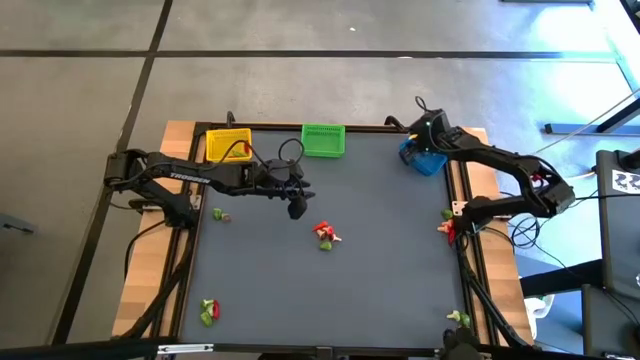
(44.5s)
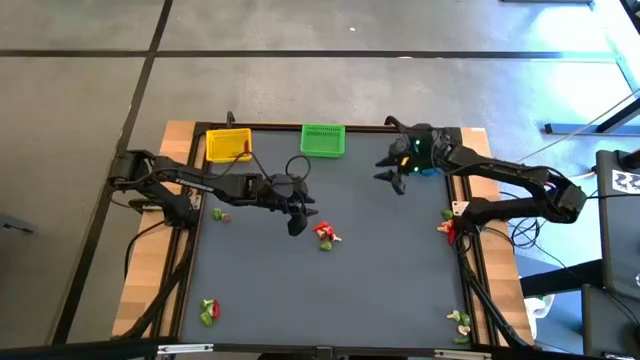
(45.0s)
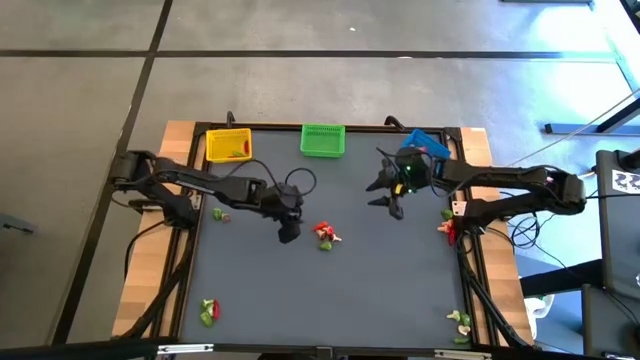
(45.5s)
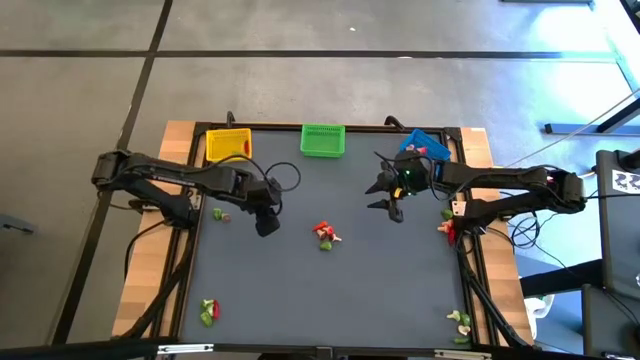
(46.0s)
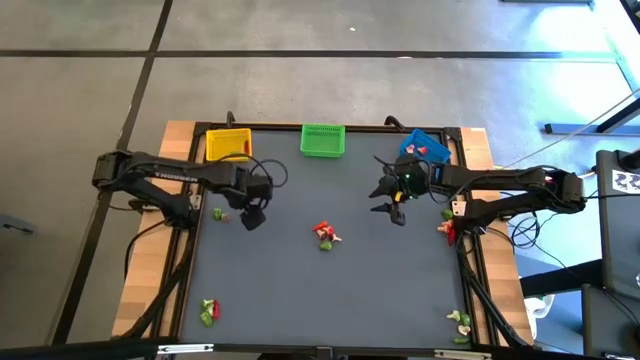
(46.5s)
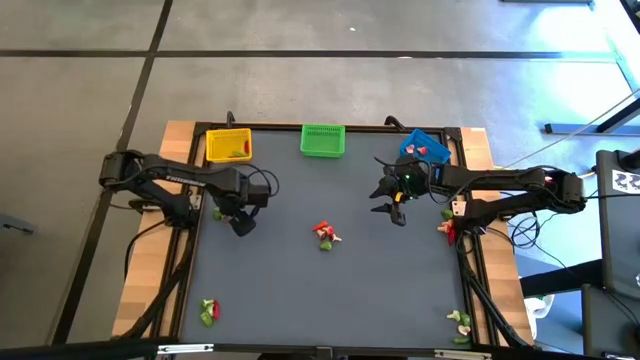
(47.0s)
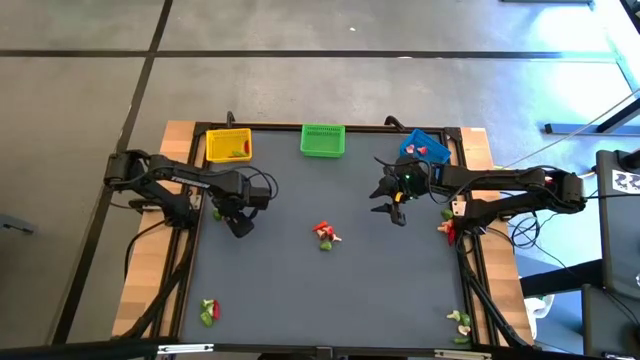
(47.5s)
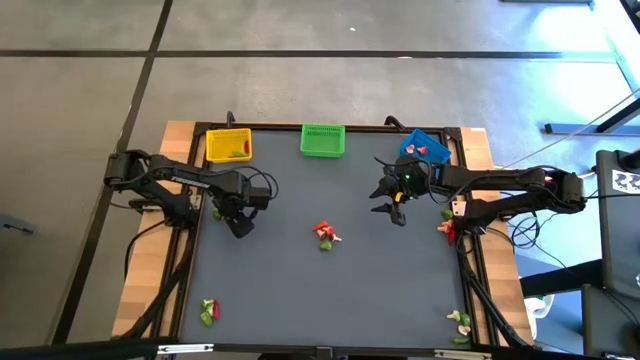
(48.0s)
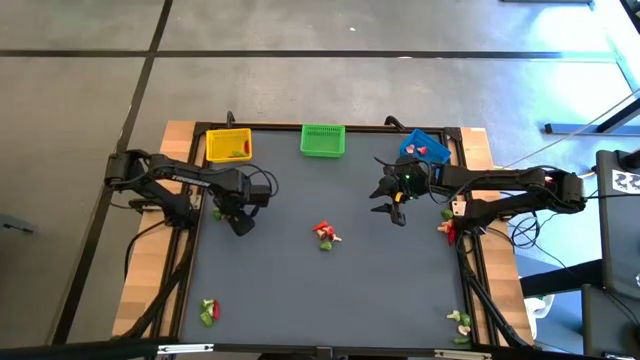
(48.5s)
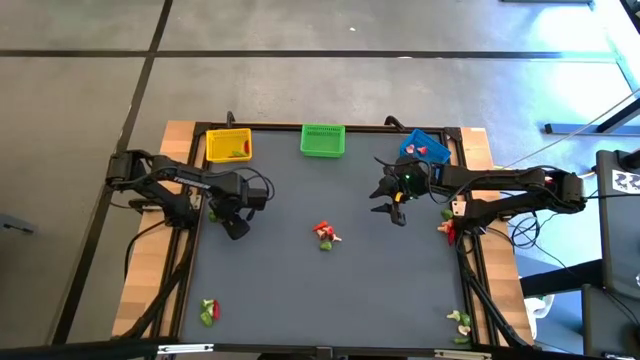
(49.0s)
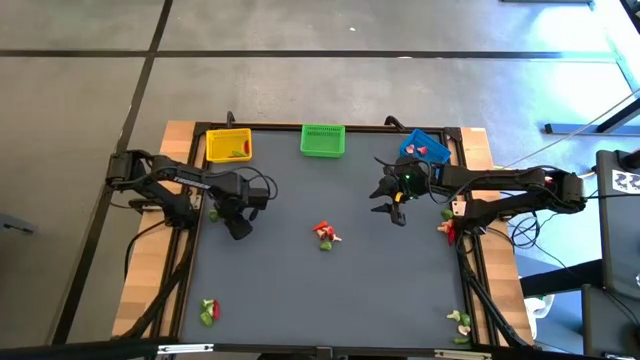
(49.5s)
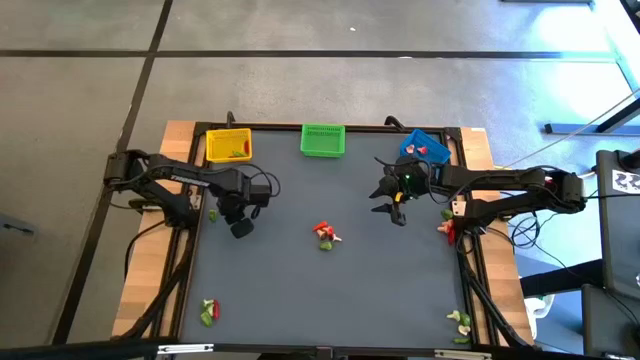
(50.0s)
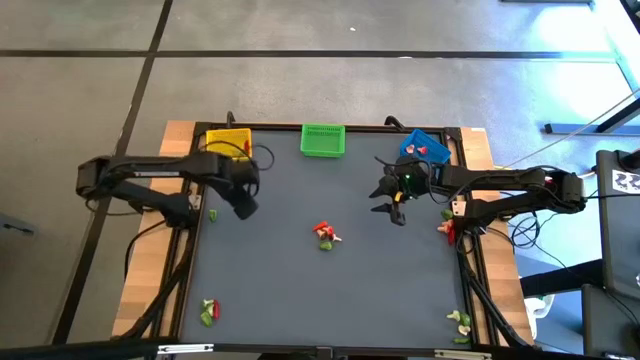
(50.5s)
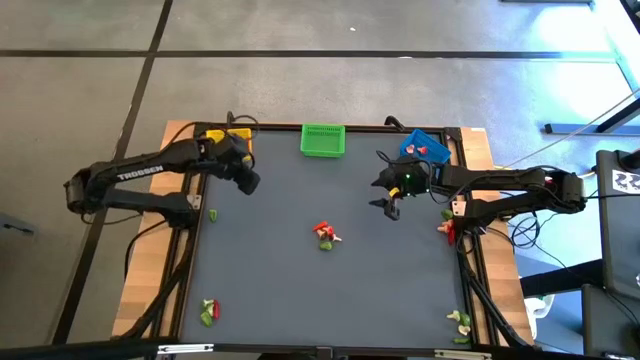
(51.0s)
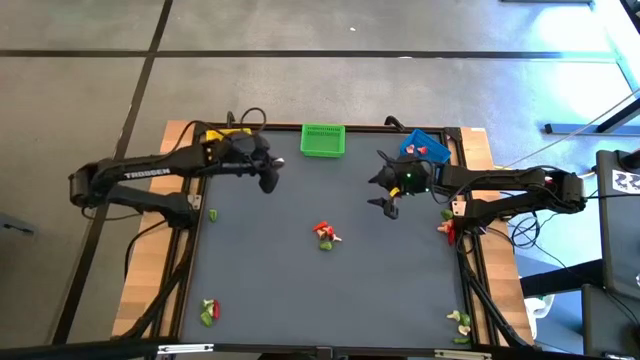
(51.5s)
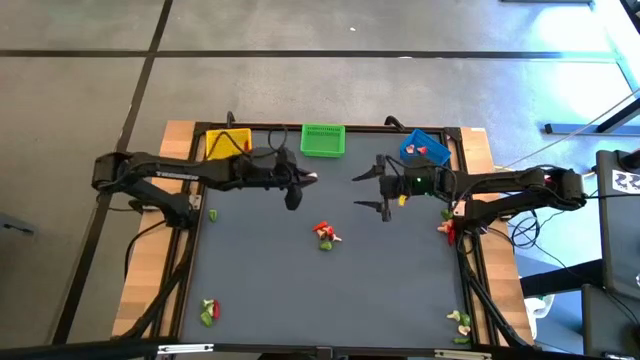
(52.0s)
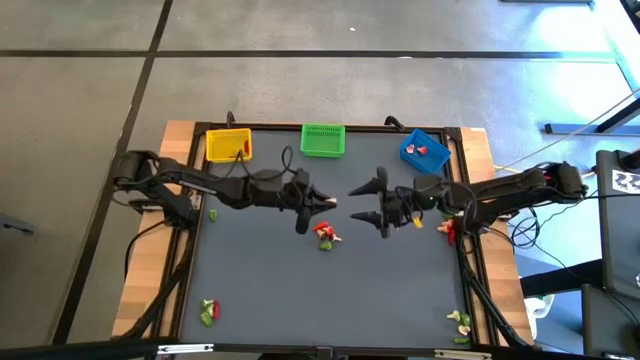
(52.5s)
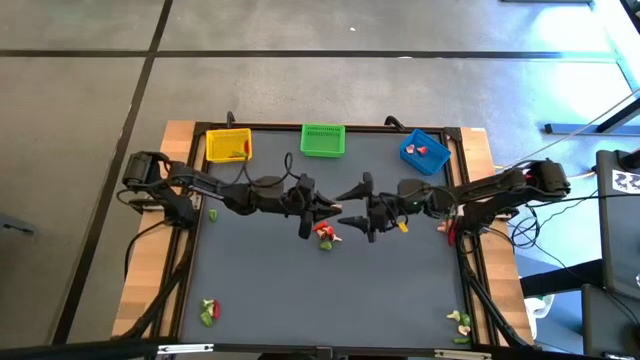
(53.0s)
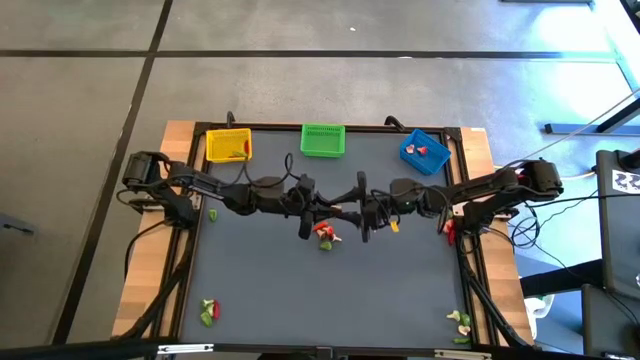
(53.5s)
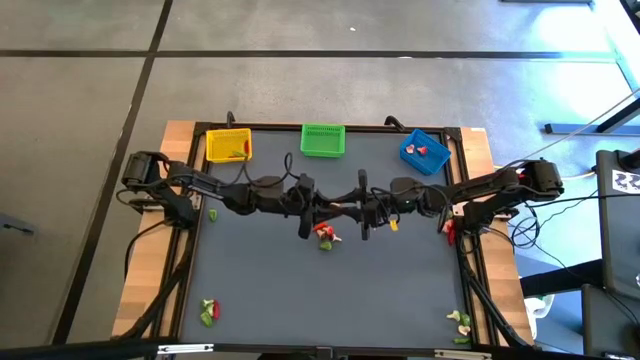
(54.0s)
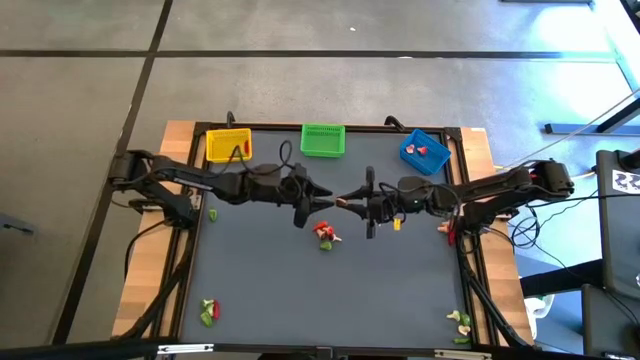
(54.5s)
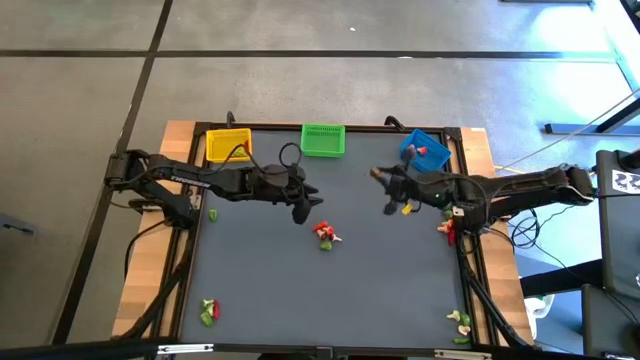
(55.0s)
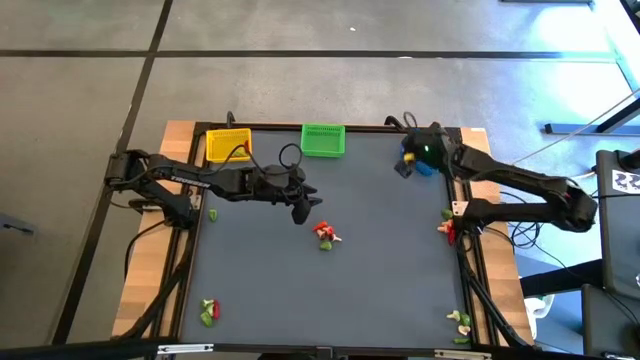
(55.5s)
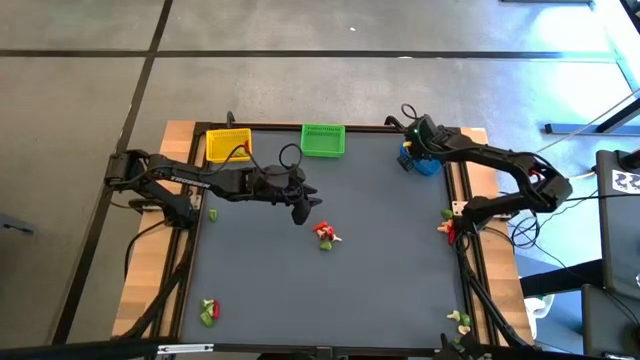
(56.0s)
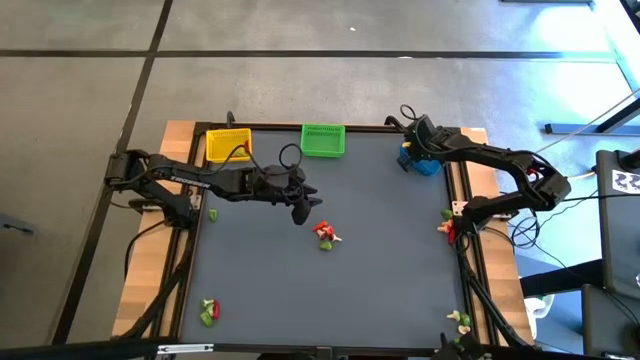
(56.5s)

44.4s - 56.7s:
Task: Sort produce into baskets
Put the brown mushroom into the blue basket

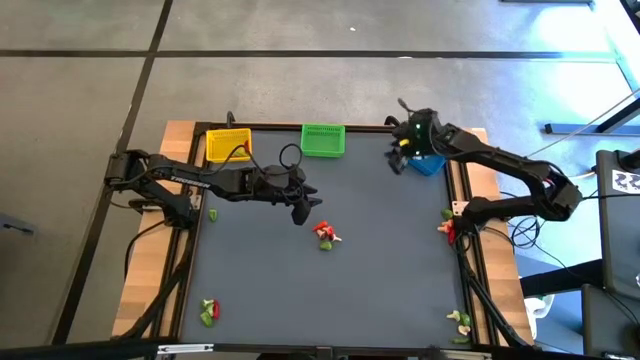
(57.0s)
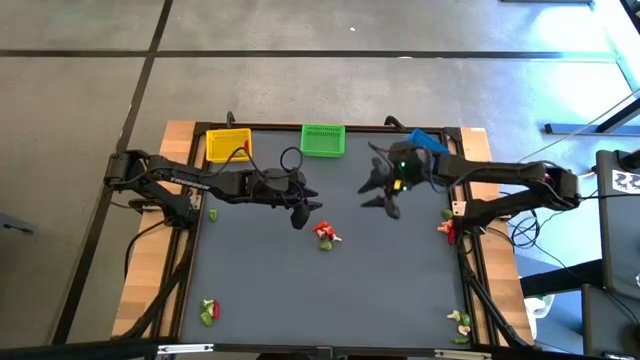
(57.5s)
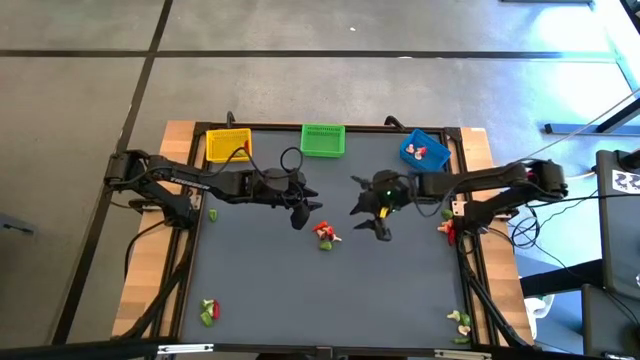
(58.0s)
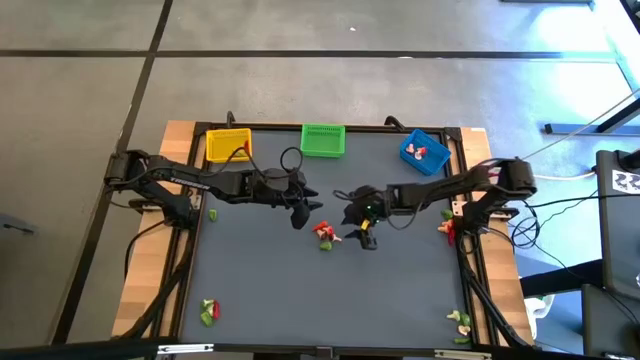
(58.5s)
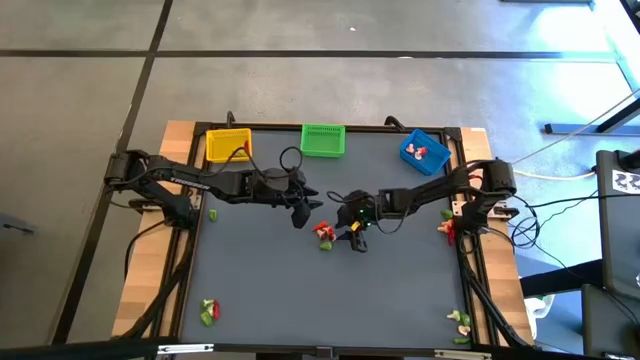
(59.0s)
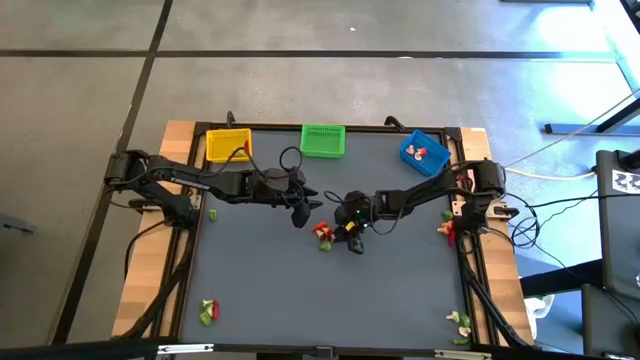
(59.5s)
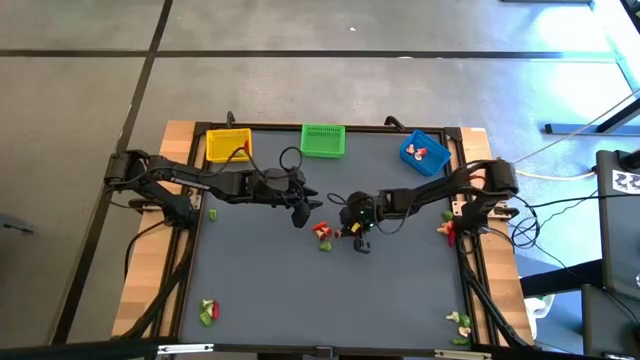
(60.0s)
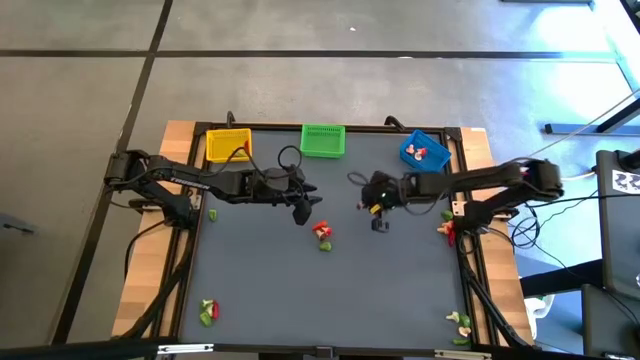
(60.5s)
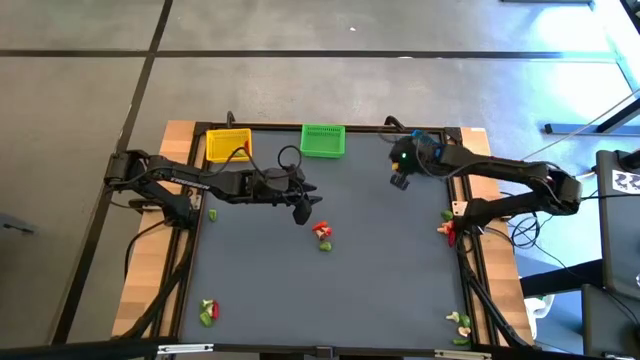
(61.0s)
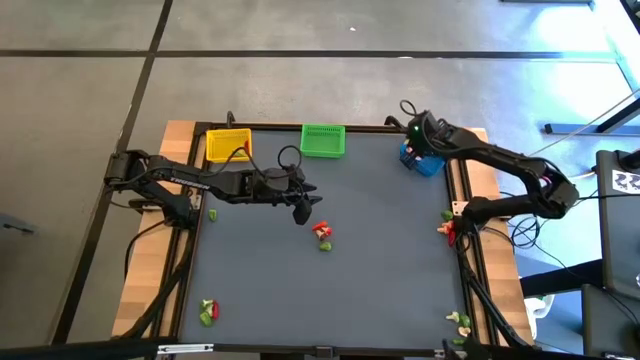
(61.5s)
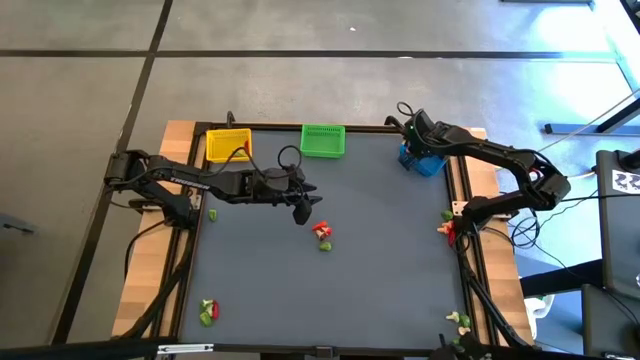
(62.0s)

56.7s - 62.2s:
Put the brown mushroom into the blue basket

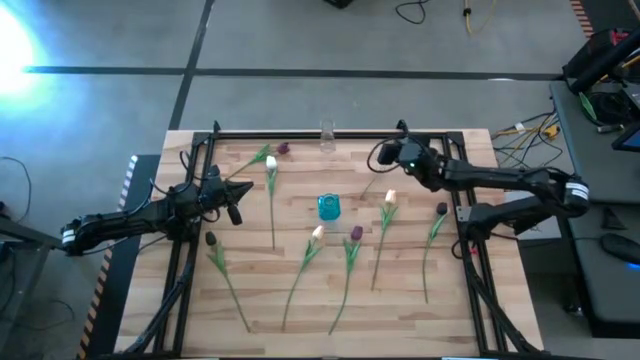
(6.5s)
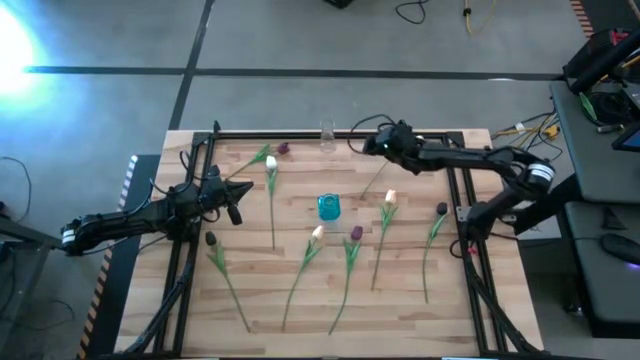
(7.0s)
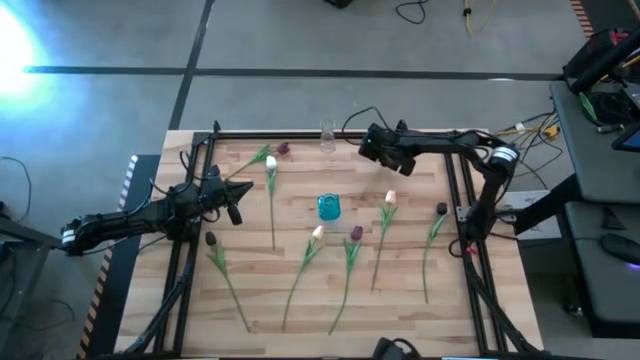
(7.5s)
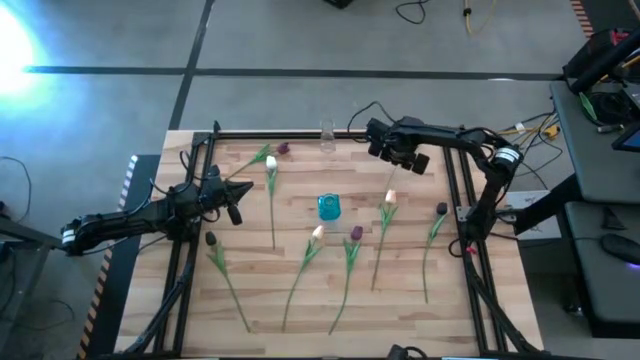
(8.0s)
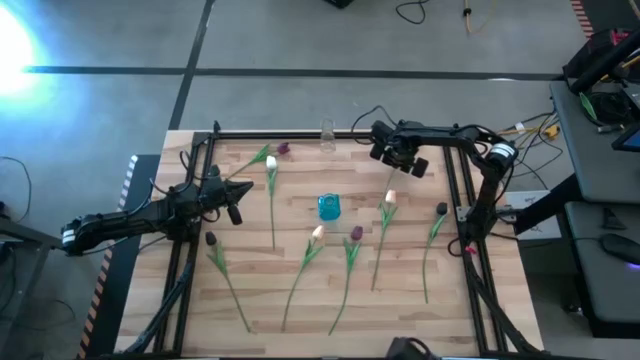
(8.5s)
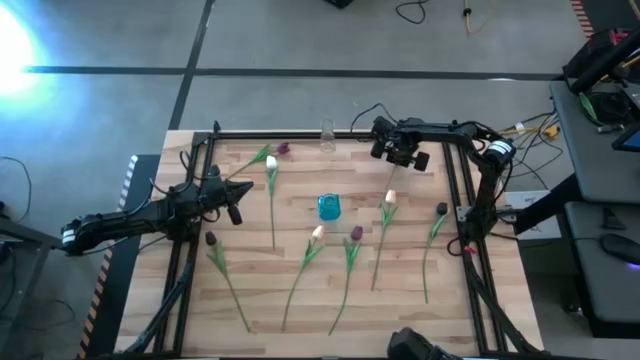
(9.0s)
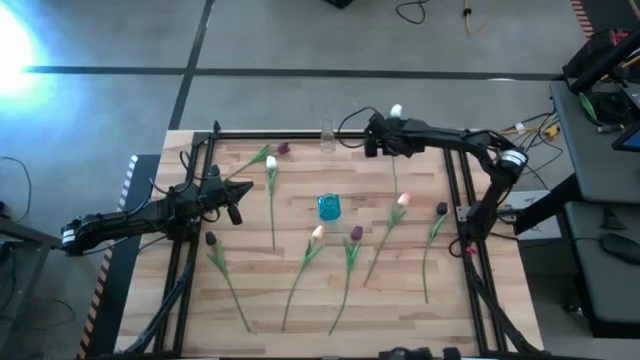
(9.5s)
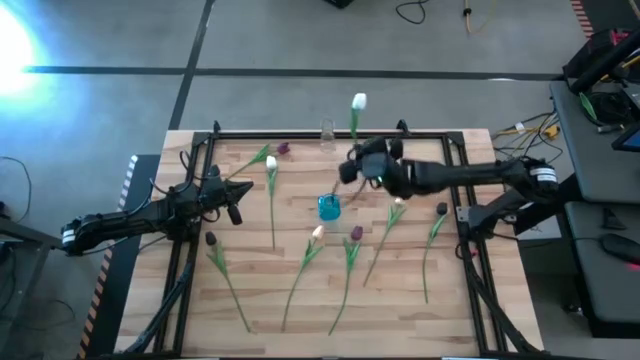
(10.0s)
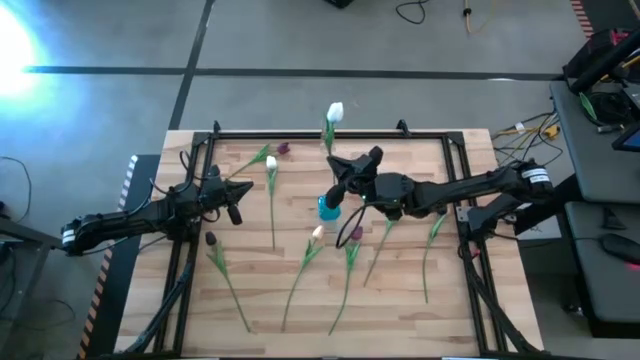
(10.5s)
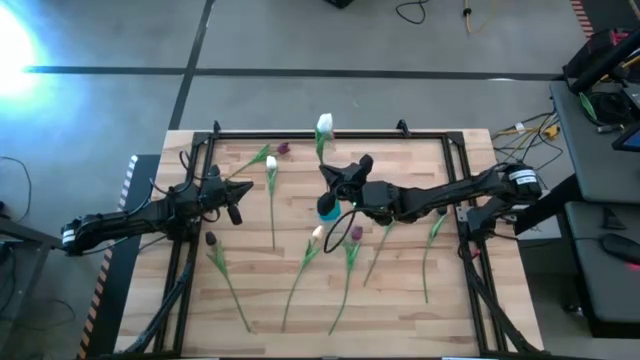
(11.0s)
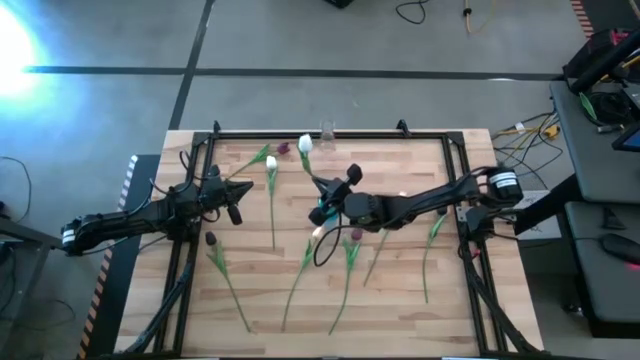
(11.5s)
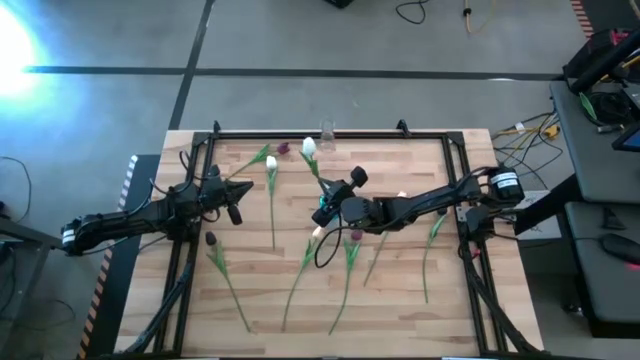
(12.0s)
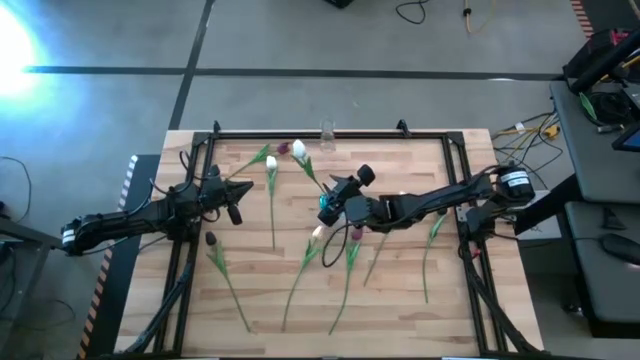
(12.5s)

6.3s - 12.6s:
Task: Sort flowers into vase by color
Put the blue tulip into the blue vase
